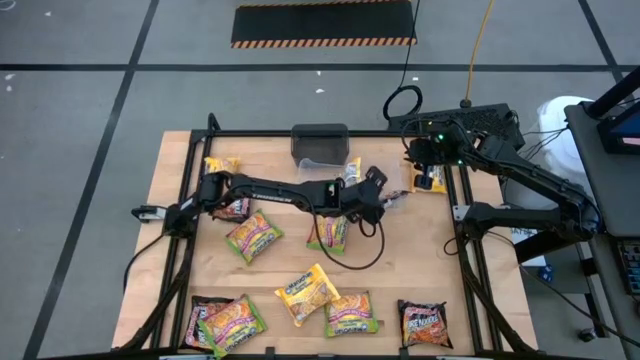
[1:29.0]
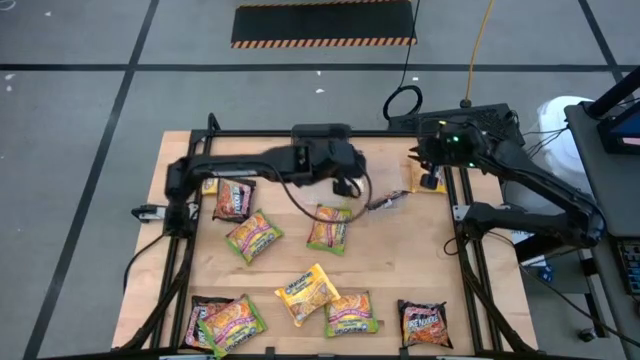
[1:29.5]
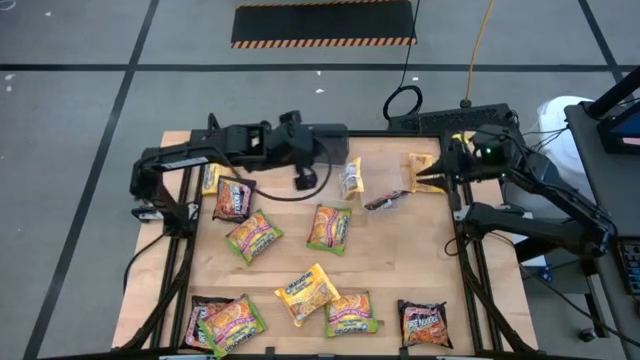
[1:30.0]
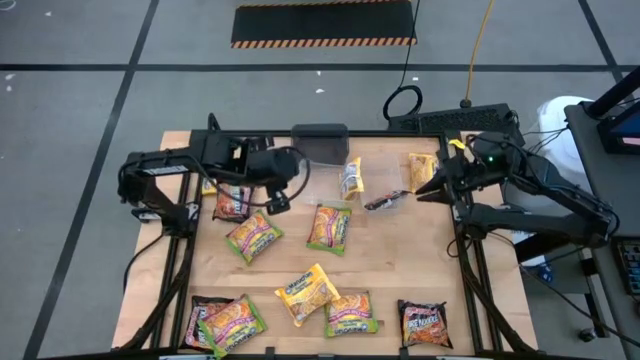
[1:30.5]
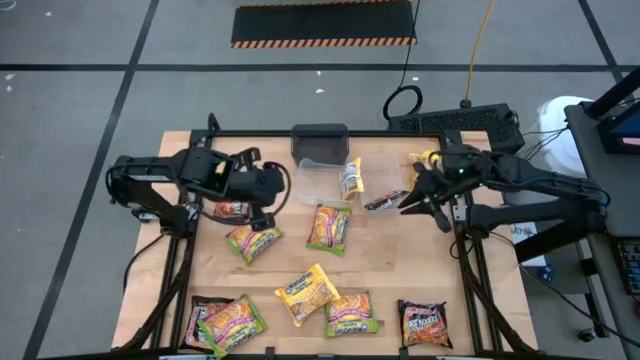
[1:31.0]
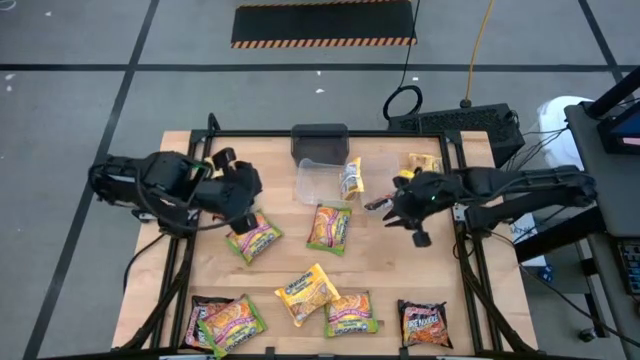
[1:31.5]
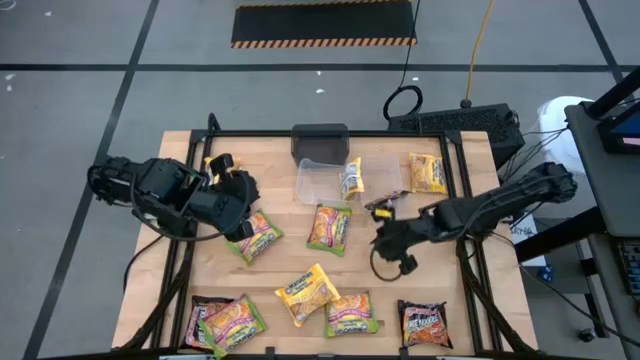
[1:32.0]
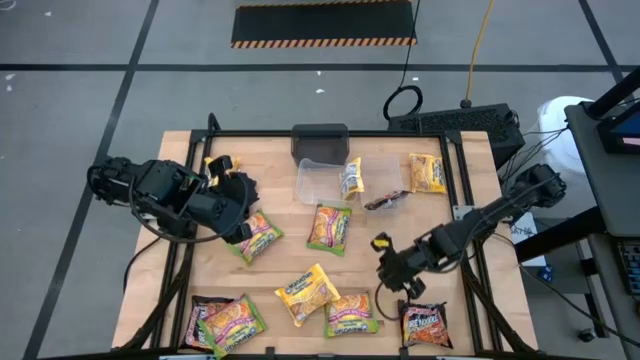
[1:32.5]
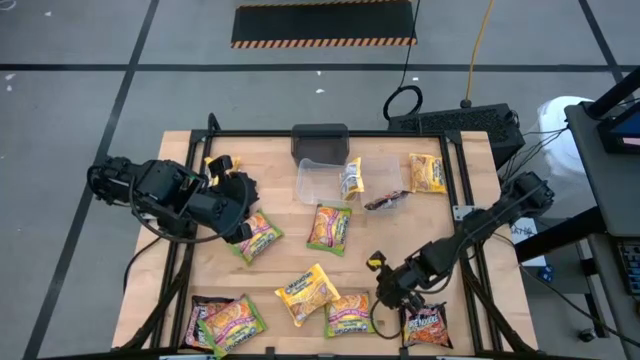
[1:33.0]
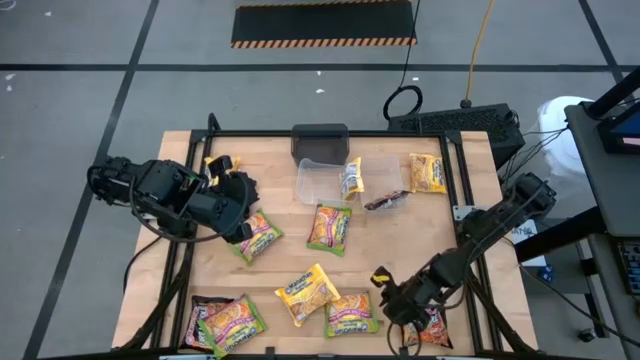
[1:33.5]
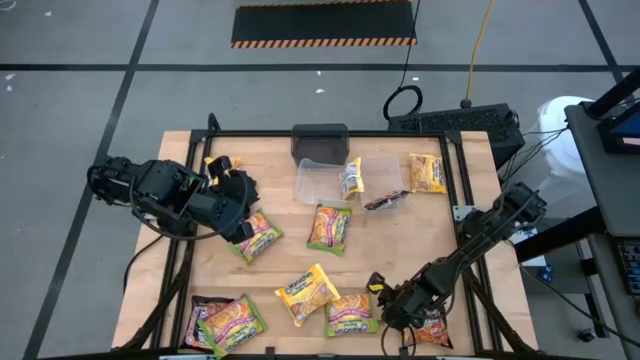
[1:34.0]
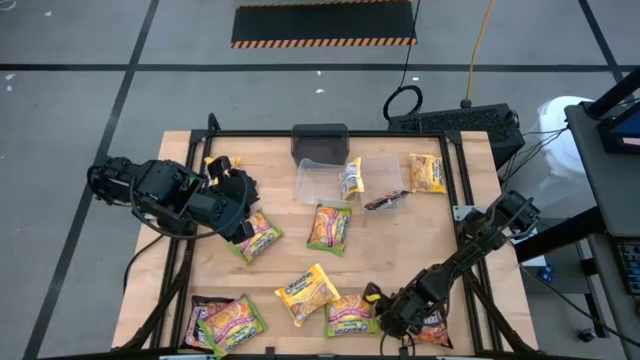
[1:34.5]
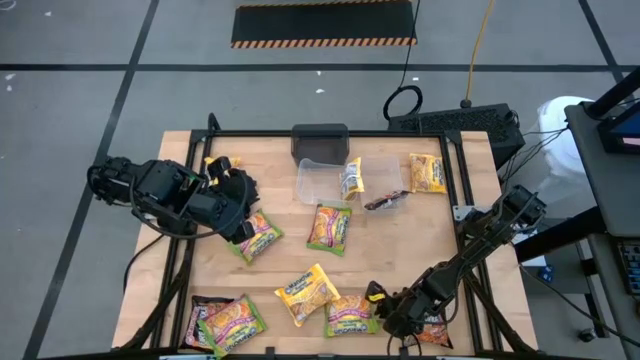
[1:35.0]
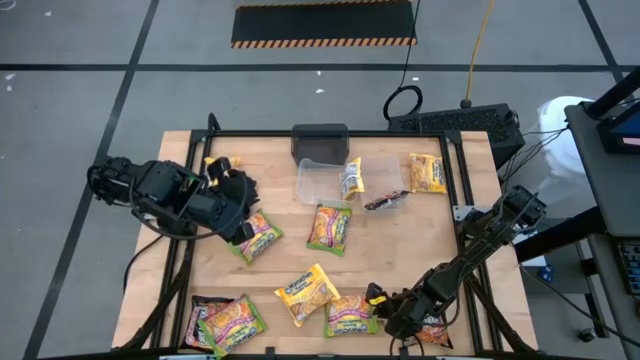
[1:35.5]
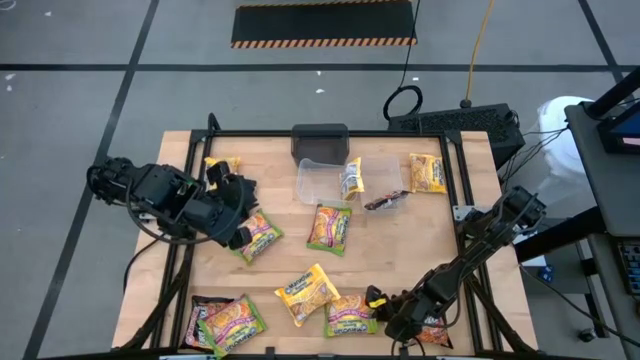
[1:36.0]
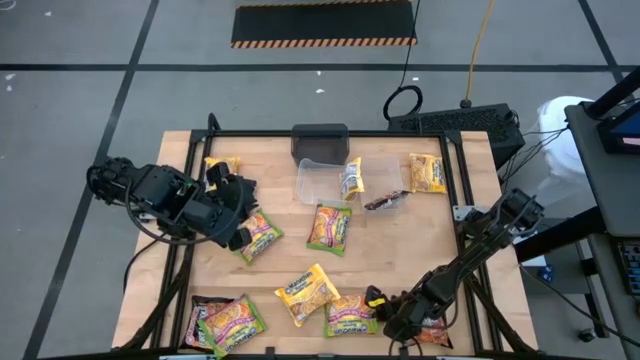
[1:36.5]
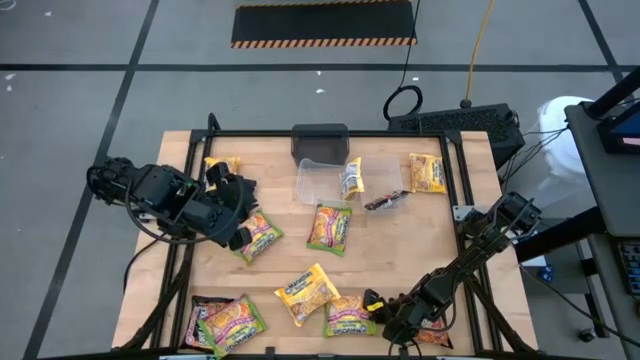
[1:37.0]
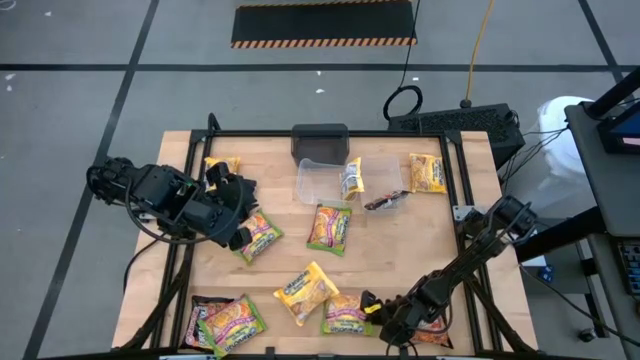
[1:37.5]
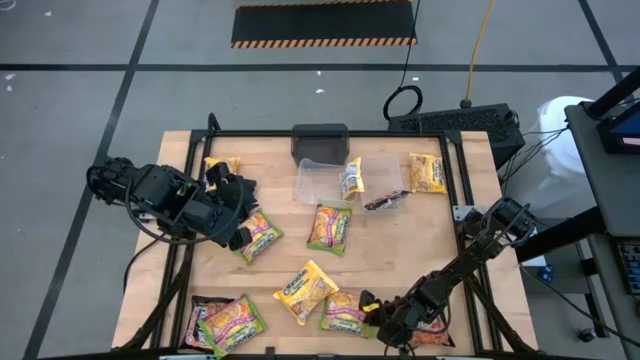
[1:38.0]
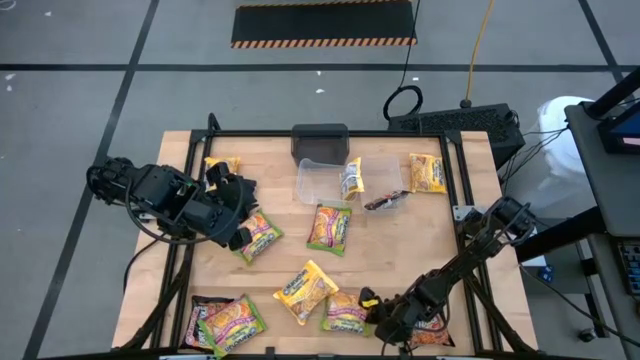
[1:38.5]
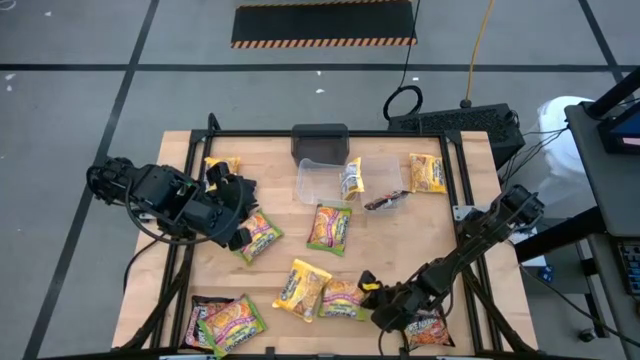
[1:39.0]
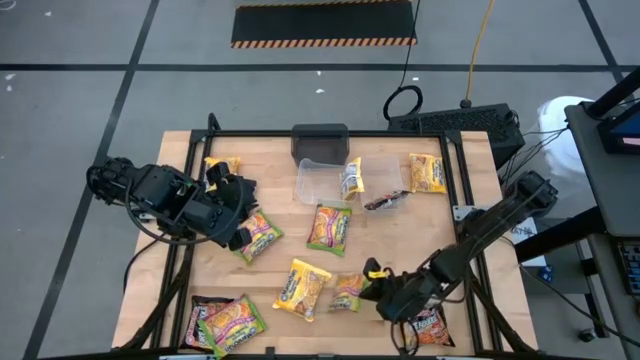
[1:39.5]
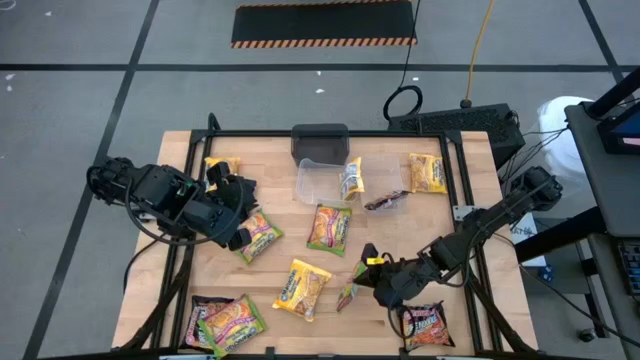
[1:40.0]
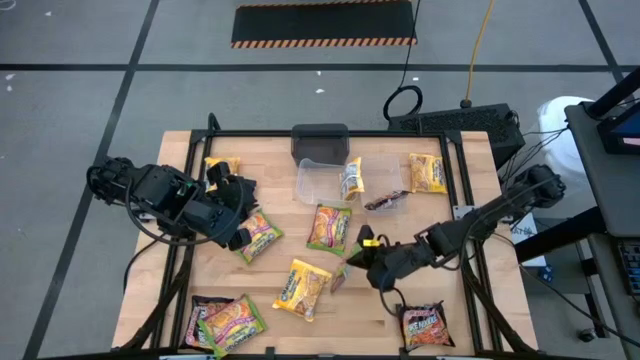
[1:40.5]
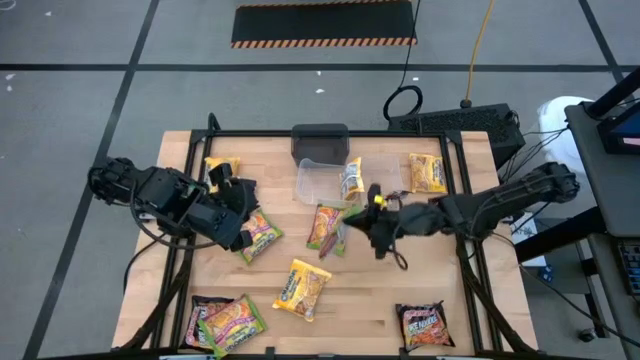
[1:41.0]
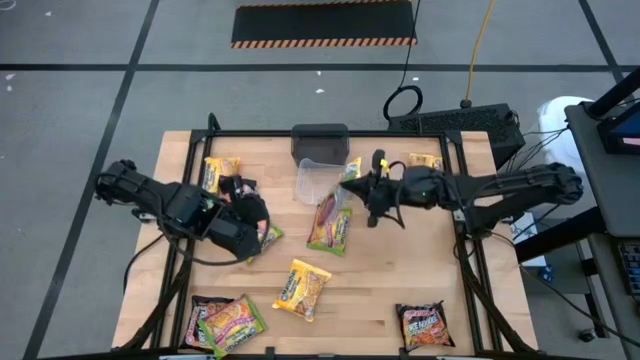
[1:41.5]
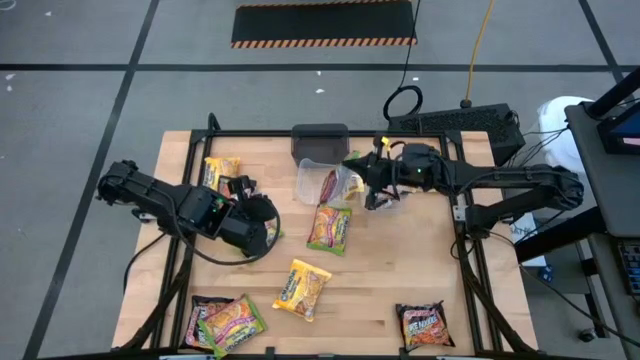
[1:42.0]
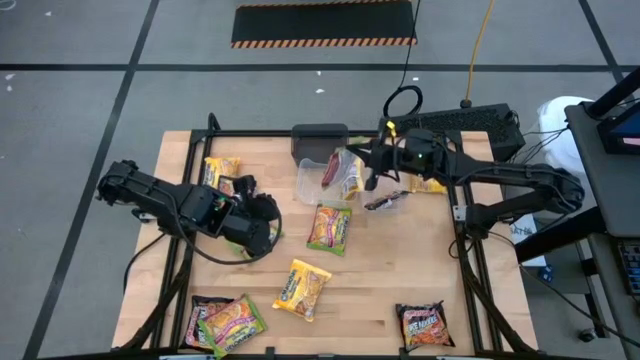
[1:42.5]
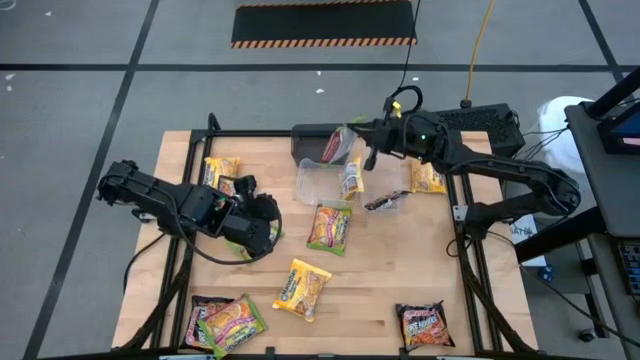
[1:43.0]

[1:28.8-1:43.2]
Task: Sort Maruchan noodles
Put the green noodle pack into the black bin

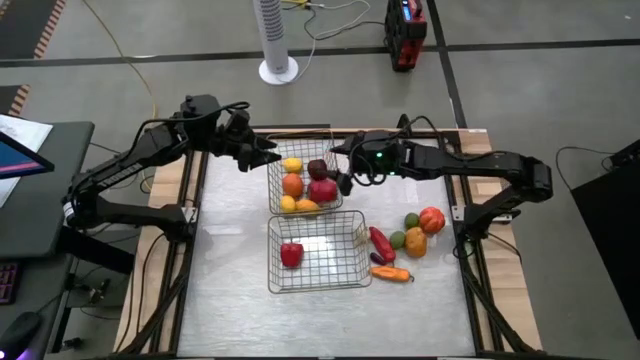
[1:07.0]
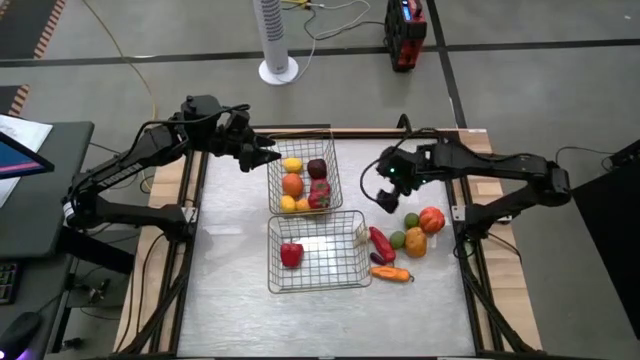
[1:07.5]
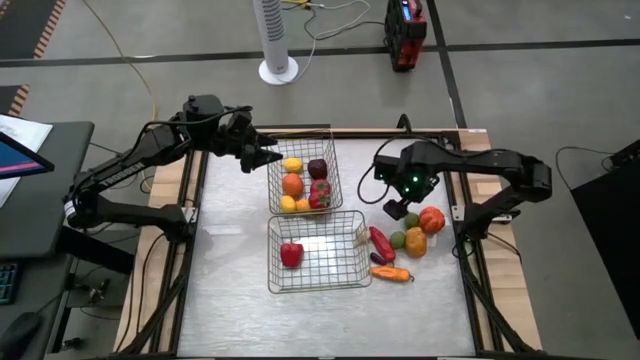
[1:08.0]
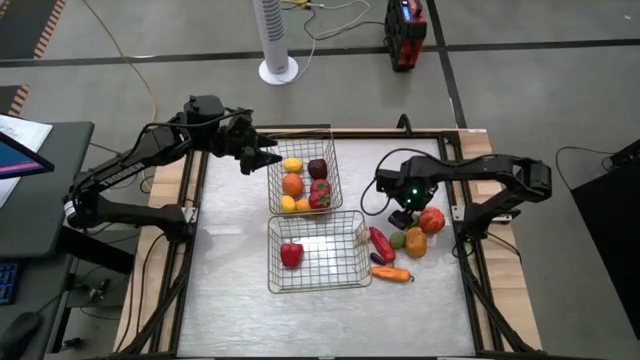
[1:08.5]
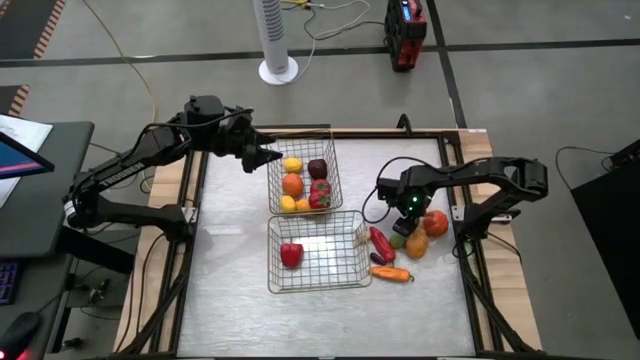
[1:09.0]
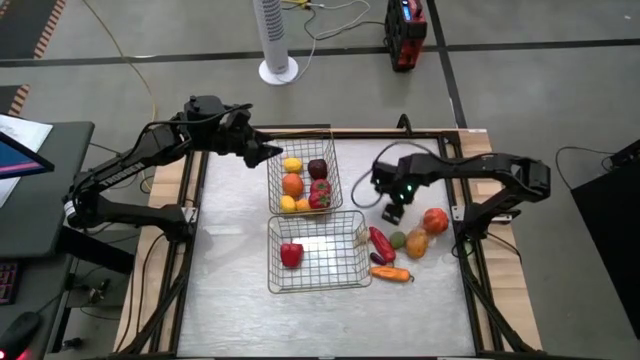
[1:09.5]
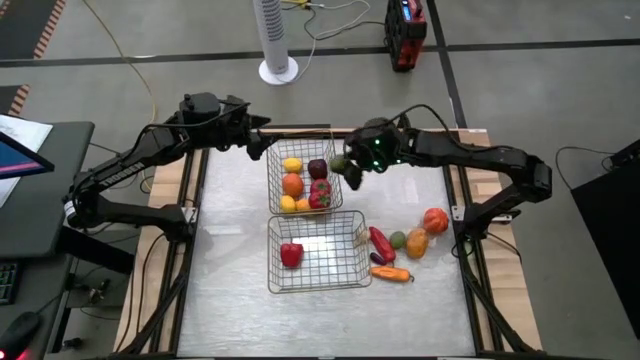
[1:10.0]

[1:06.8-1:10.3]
Task: Sort produce into baskets
Put the top green lime into the top wire basket

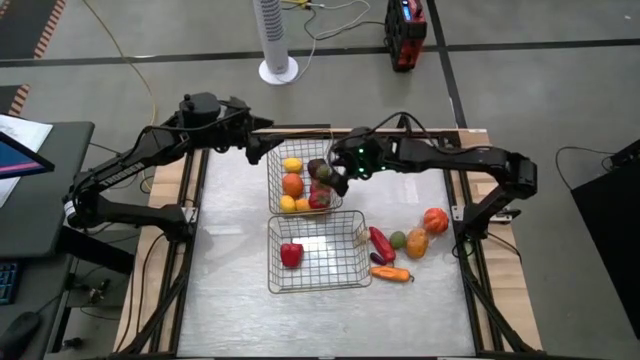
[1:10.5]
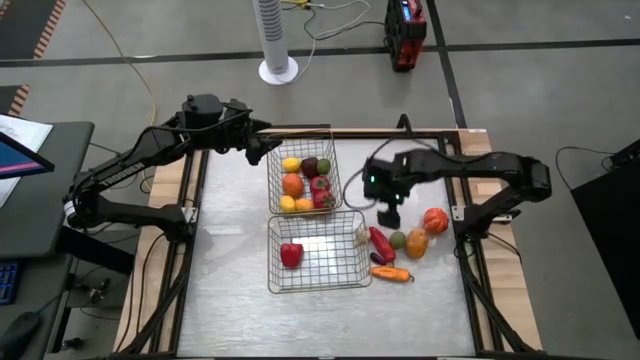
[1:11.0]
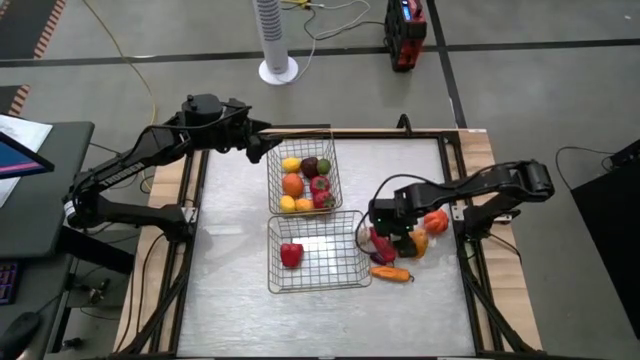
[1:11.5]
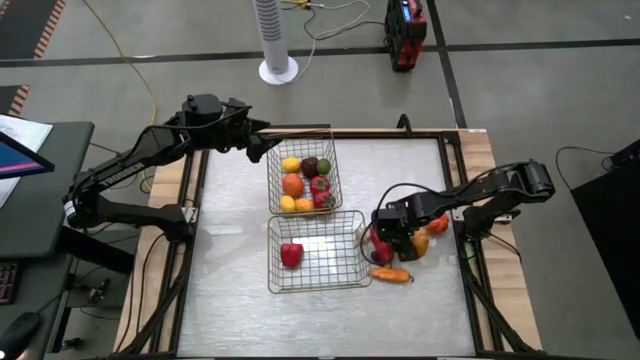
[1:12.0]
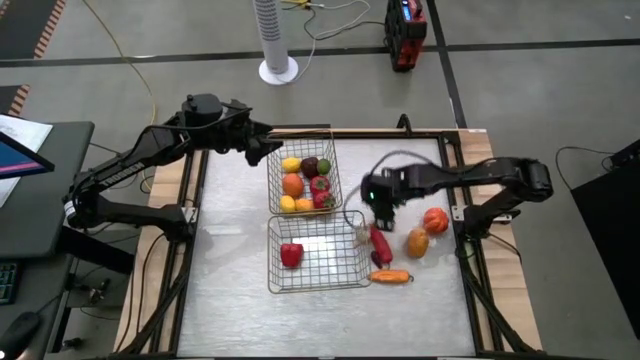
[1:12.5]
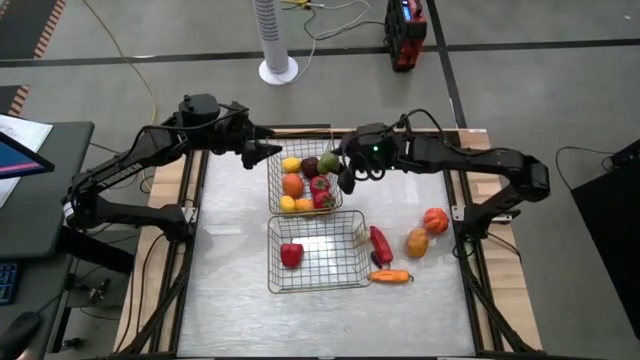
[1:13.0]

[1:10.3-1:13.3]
Put the green lime into the top wire basket
